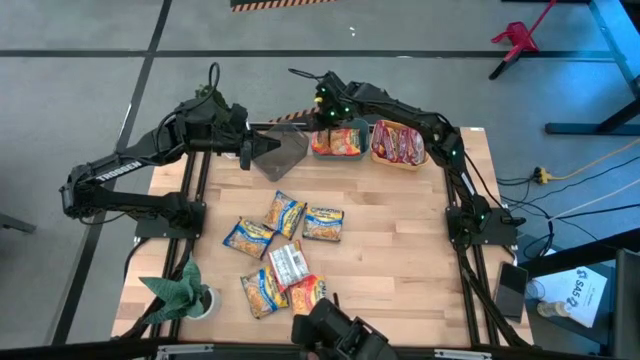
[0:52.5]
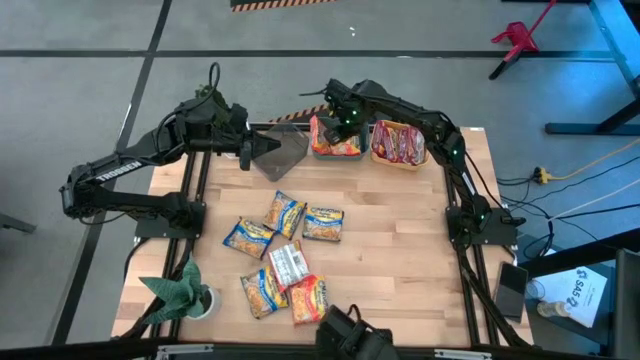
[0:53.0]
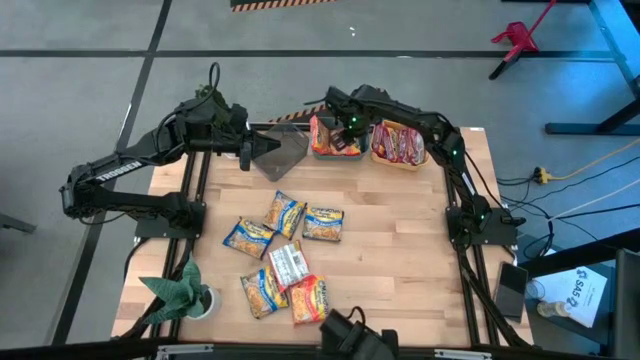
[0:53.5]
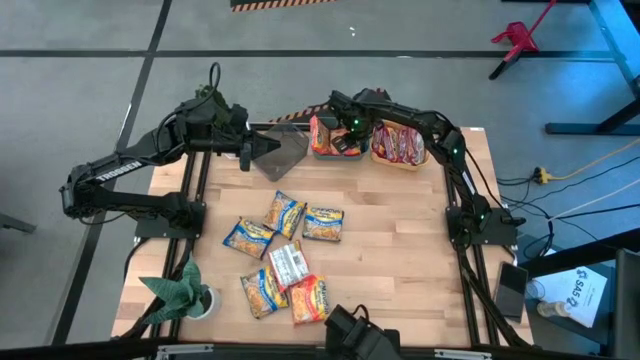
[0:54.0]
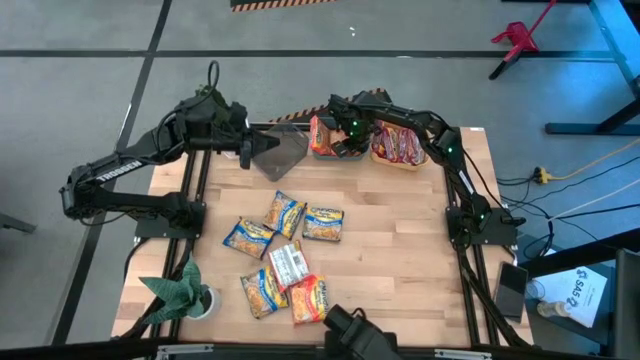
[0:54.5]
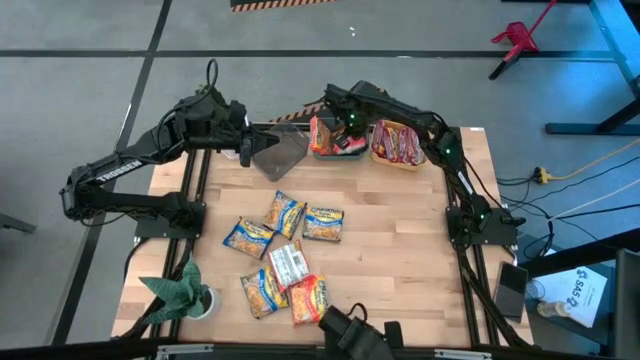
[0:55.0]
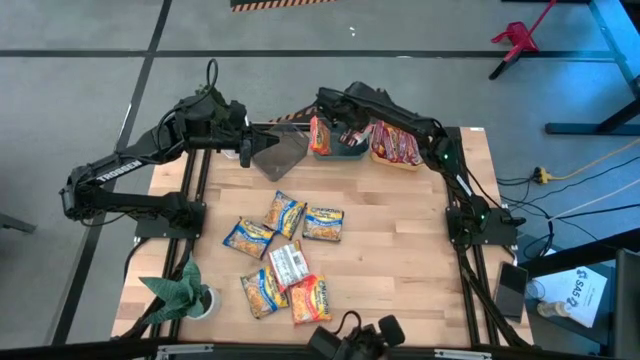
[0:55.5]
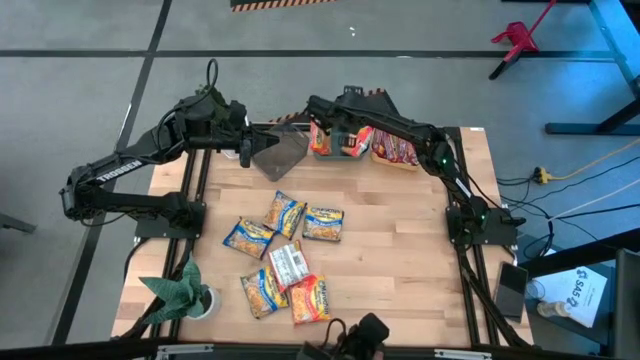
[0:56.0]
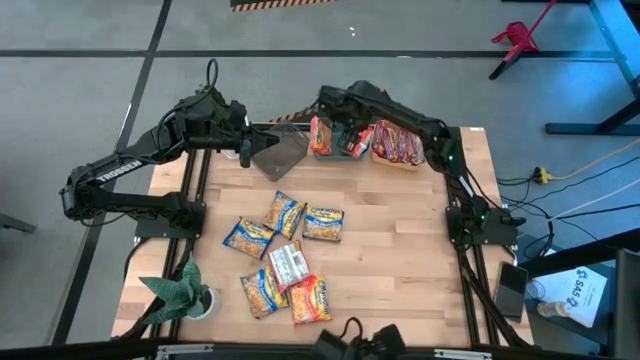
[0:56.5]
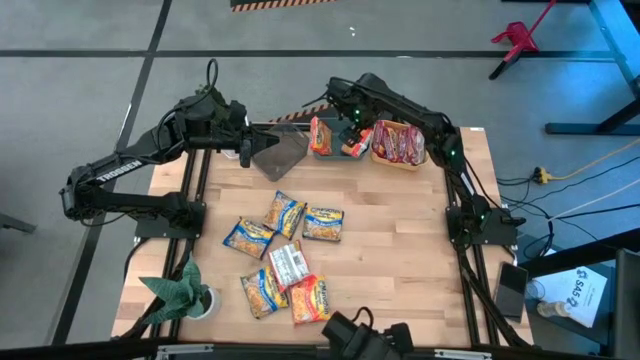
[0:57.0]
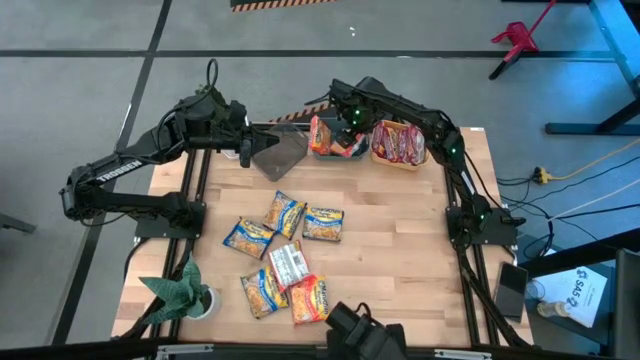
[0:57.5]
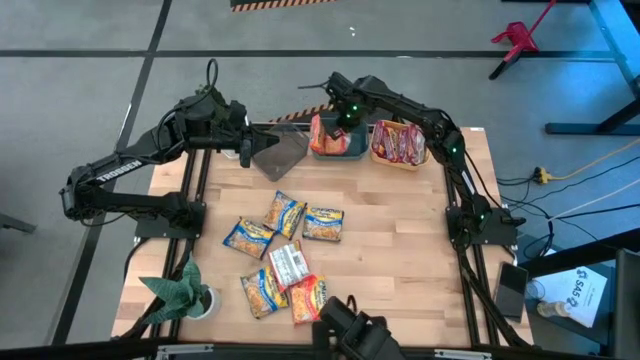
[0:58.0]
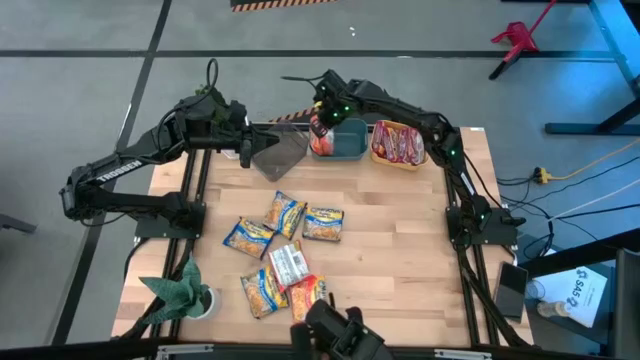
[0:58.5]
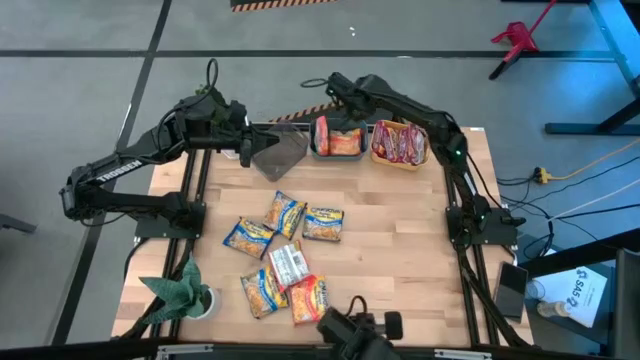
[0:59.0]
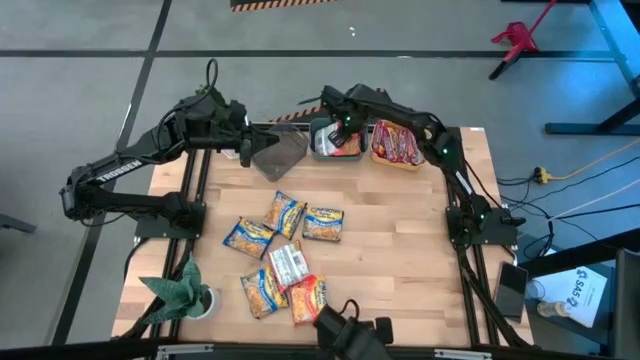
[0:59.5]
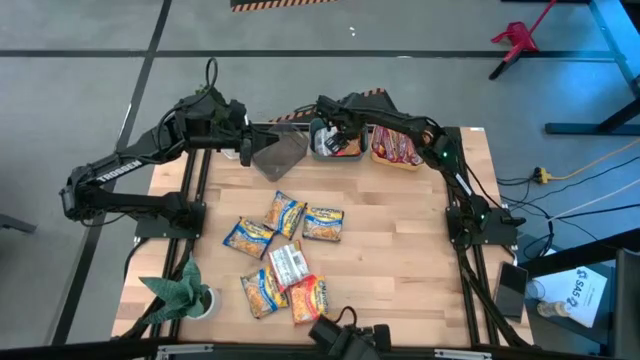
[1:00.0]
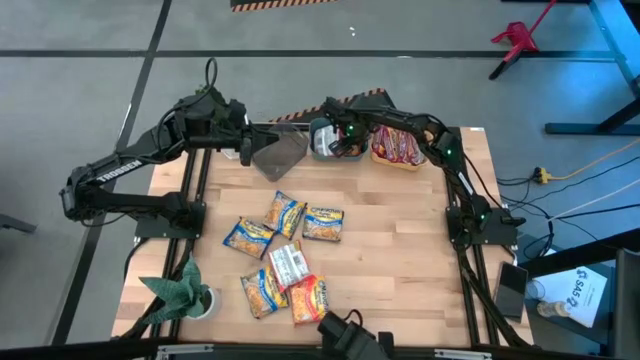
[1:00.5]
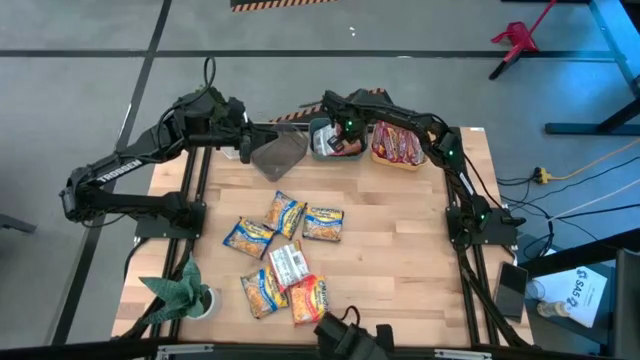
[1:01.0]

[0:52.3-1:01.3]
Task: Sort Maruchan noodles
Adjust the orange noodle pack in the blue bin

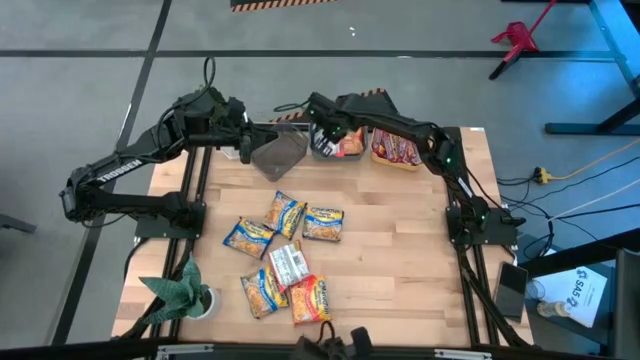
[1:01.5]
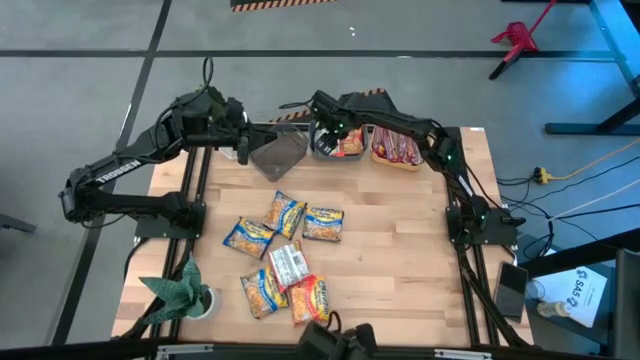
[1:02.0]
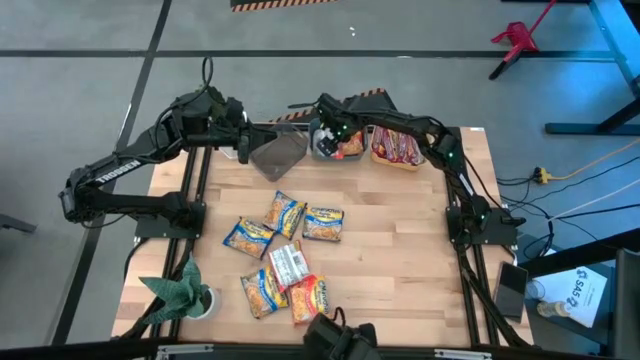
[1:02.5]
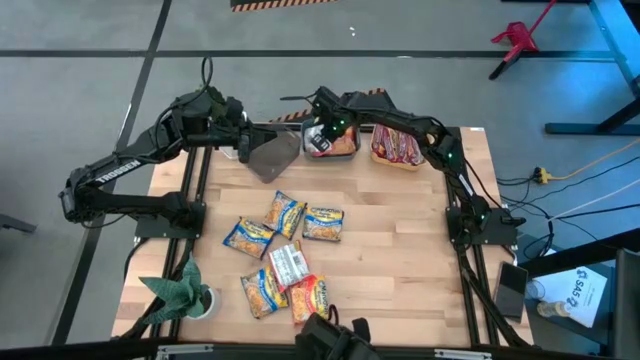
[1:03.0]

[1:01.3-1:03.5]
Adjust the orange noodle pack in the blue bin

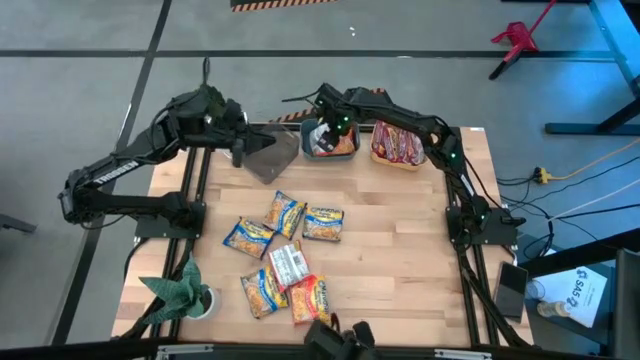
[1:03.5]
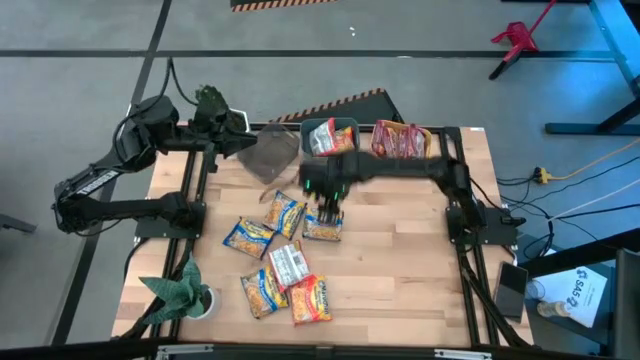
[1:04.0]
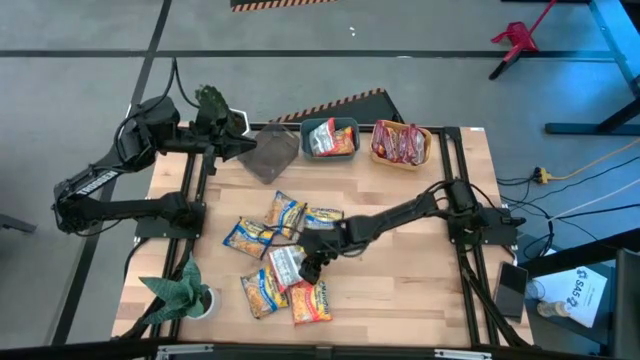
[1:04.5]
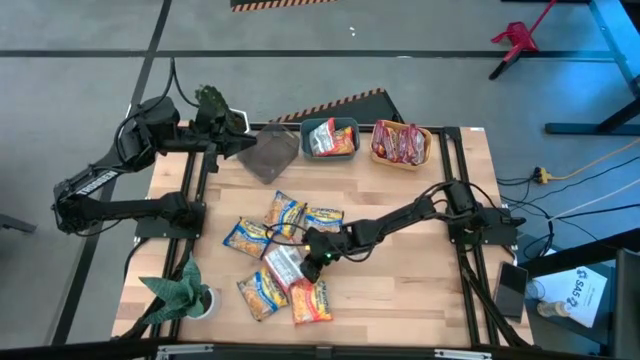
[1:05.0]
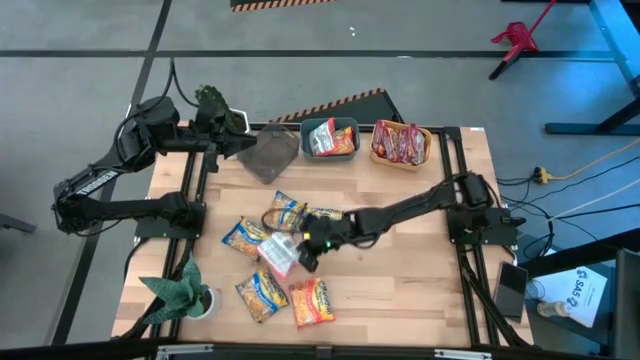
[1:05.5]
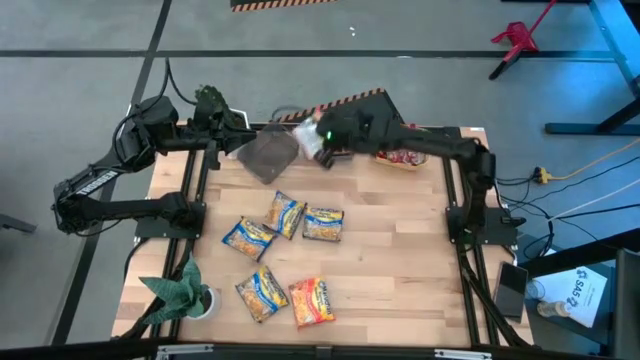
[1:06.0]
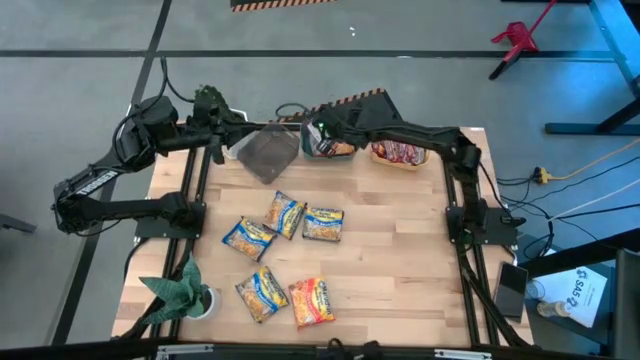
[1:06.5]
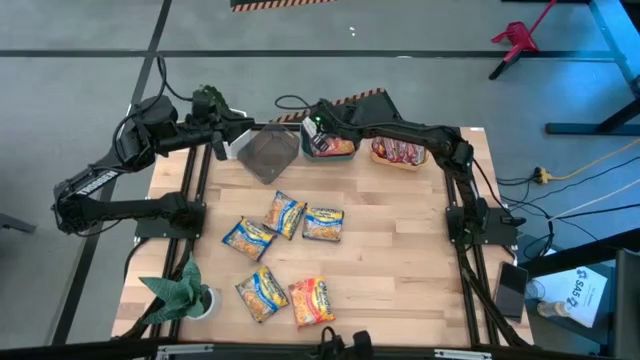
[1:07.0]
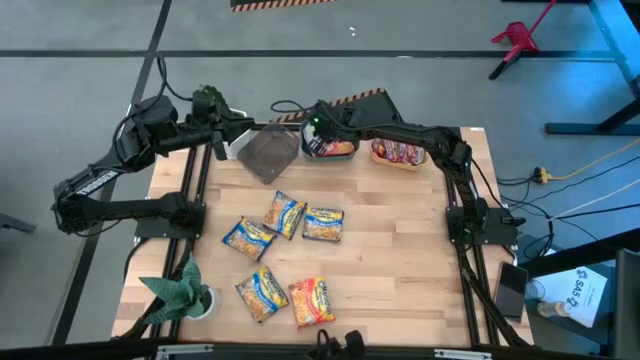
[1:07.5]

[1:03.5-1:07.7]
Put the top orange noodle pack into the blue bin

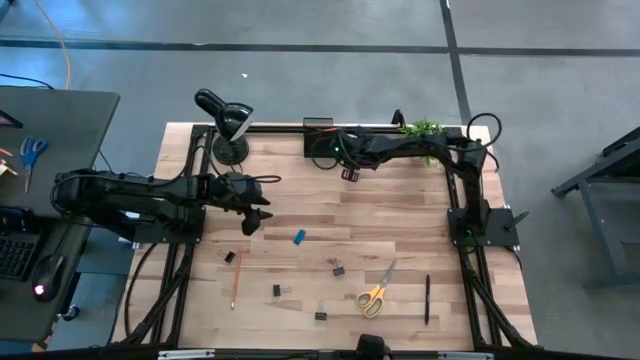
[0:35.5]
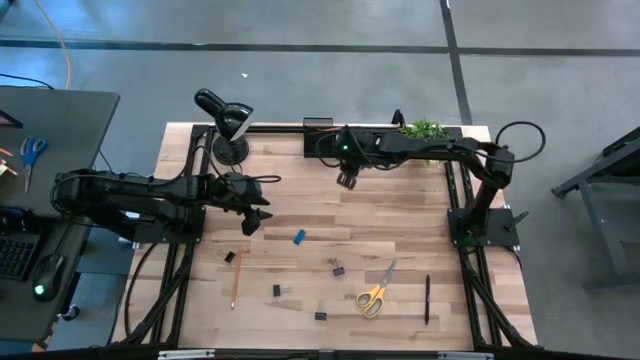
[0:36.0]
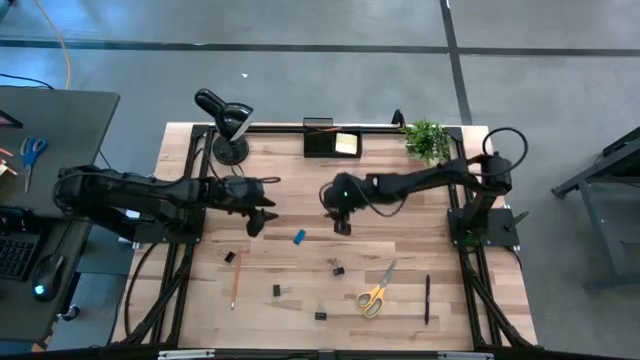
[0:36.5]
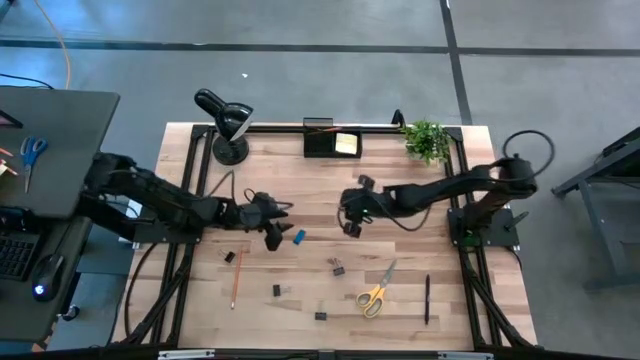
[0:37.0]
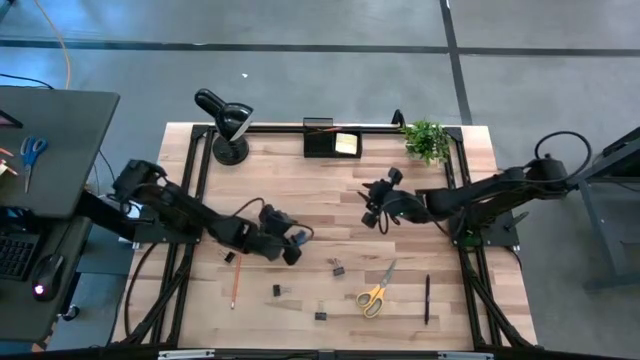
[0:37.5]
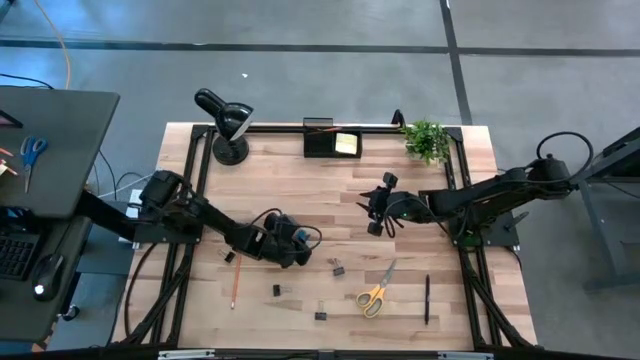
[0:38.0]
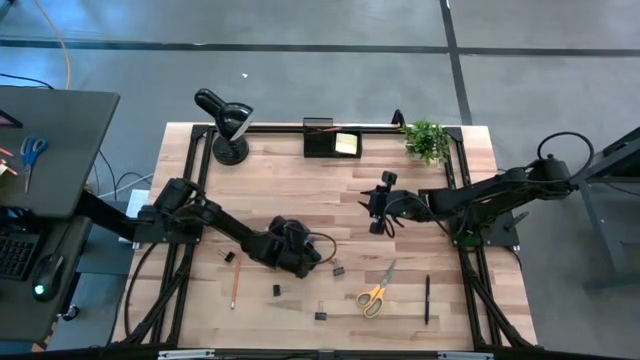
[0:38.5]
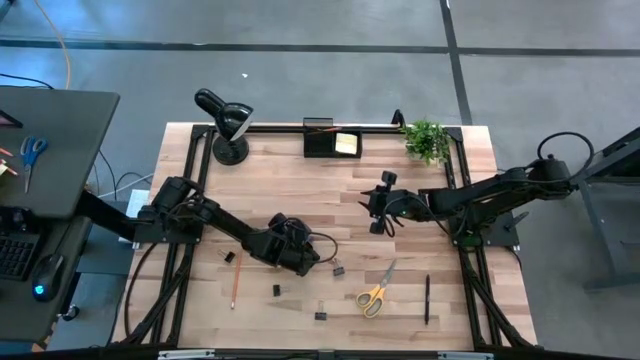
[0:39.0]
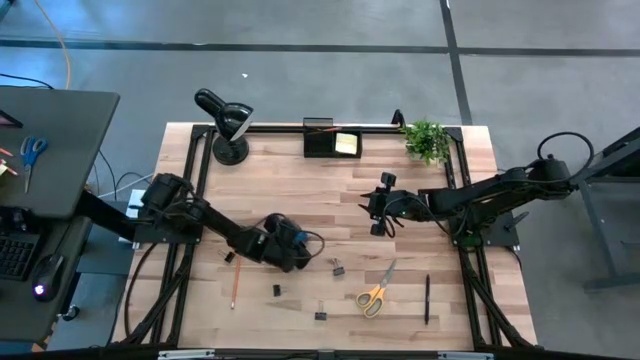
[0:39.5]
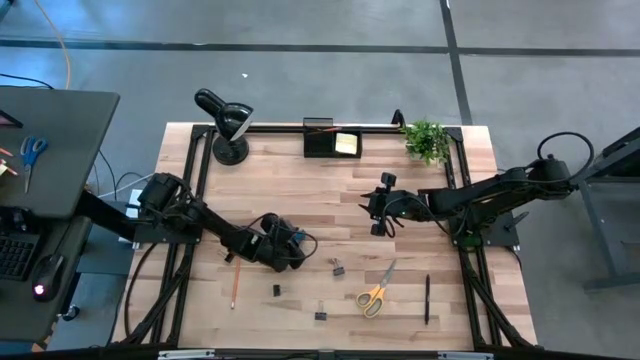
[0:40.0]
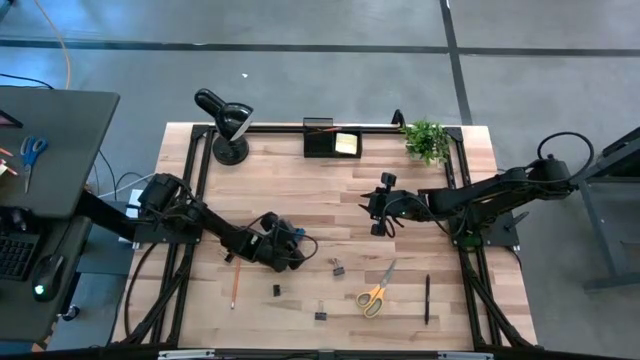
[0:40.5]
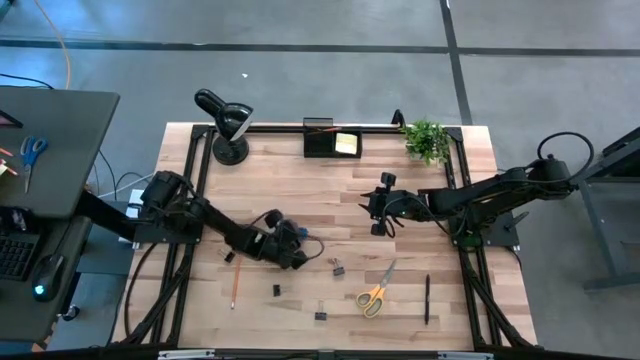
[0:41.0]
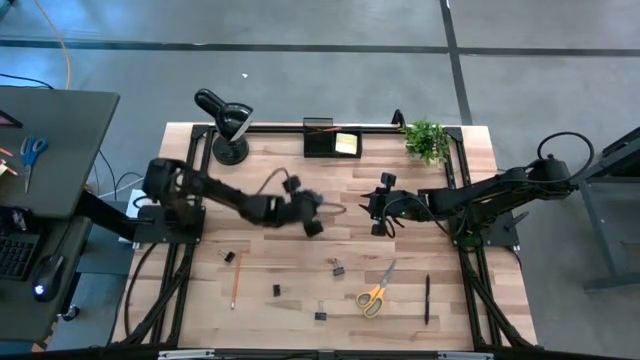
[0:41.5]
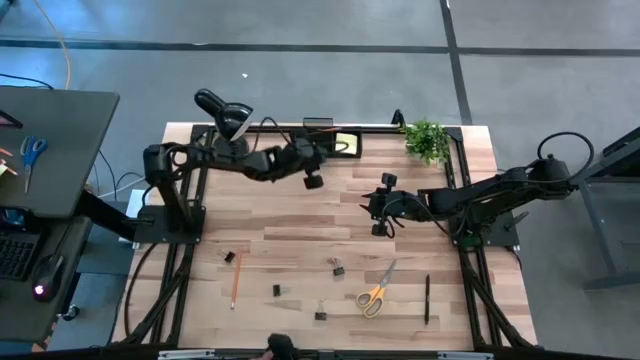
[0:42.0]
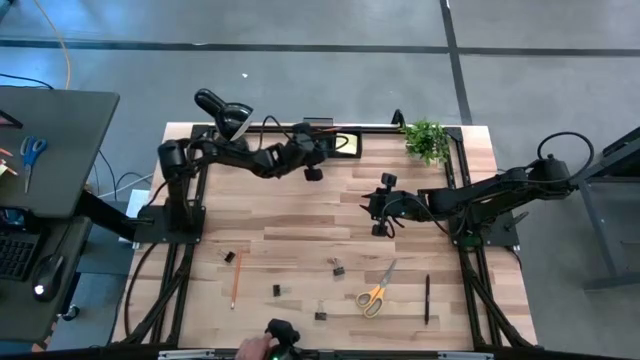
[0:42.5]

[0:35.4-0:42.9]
Task: Pick and place office supplies into organizer
Put the blue eraser into the black desk organizer
